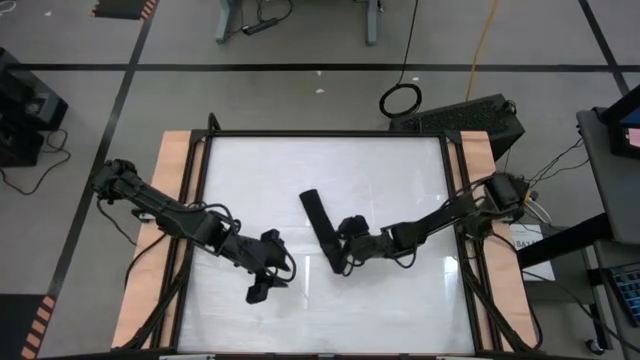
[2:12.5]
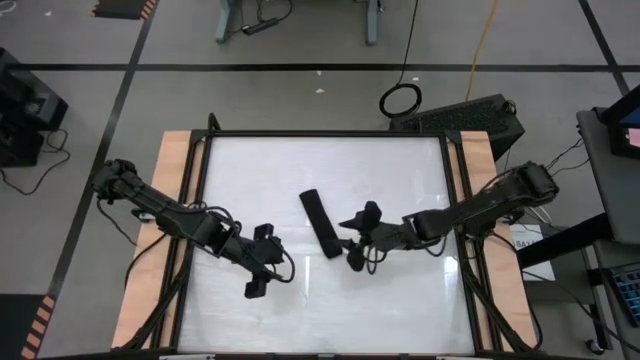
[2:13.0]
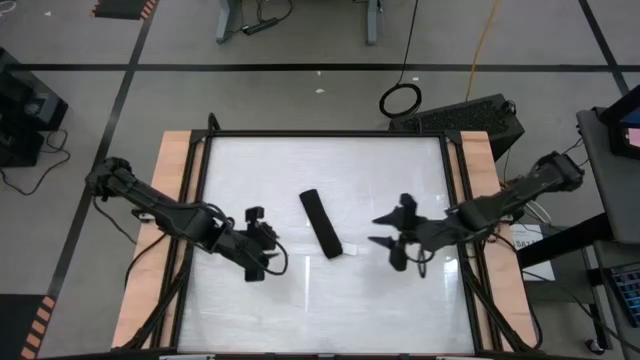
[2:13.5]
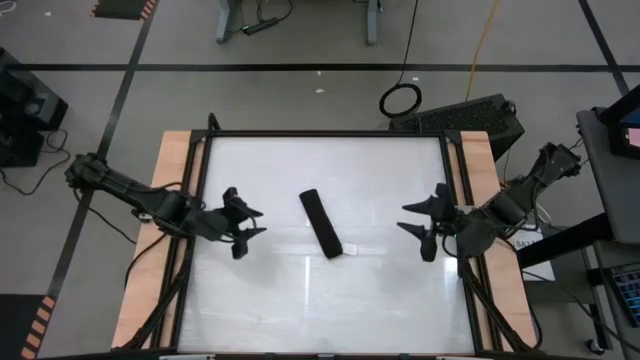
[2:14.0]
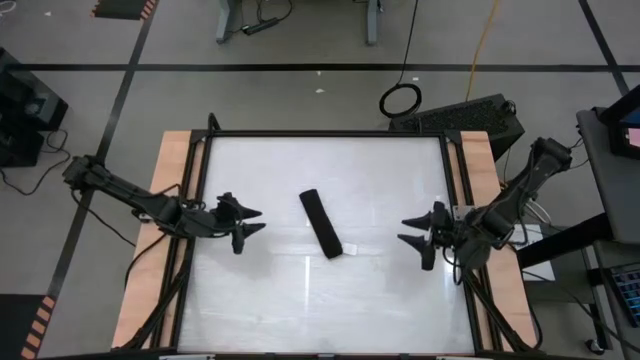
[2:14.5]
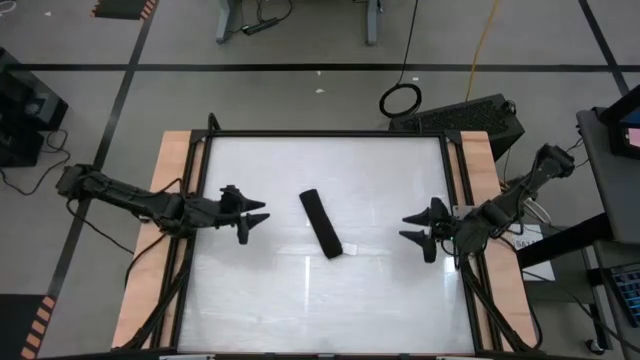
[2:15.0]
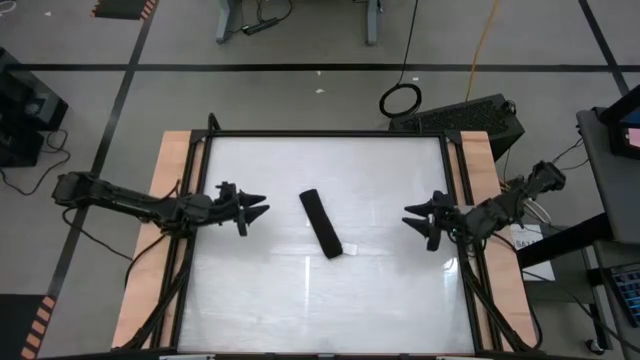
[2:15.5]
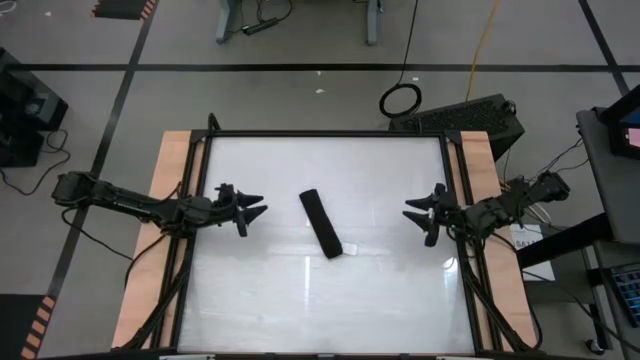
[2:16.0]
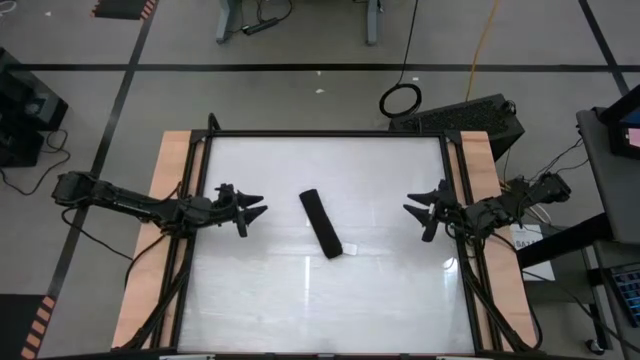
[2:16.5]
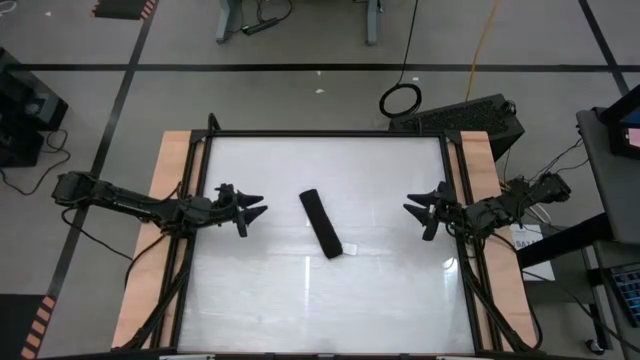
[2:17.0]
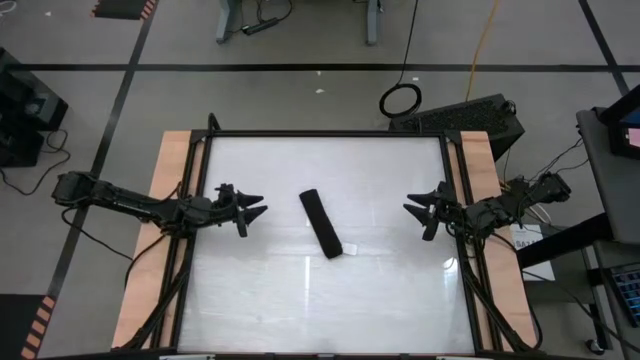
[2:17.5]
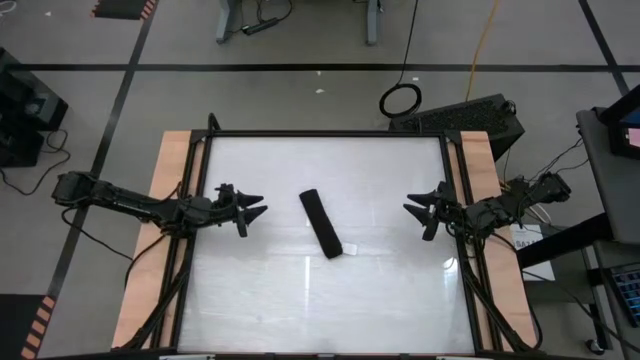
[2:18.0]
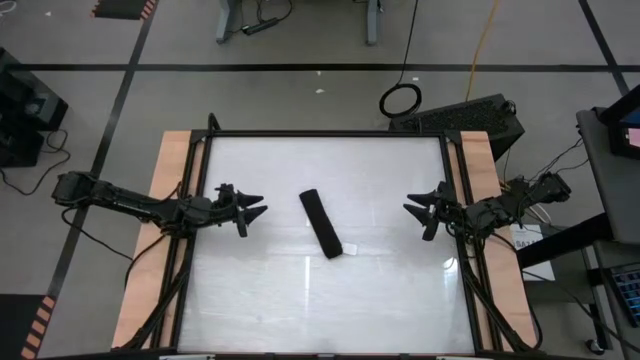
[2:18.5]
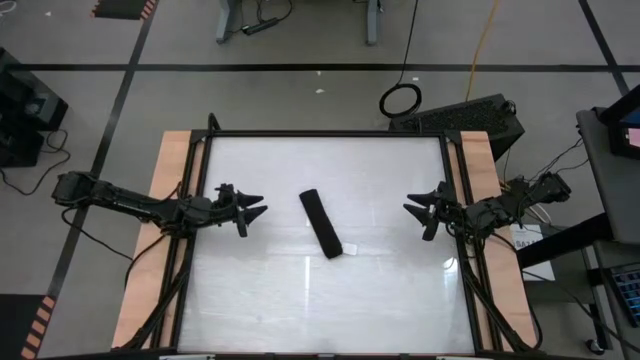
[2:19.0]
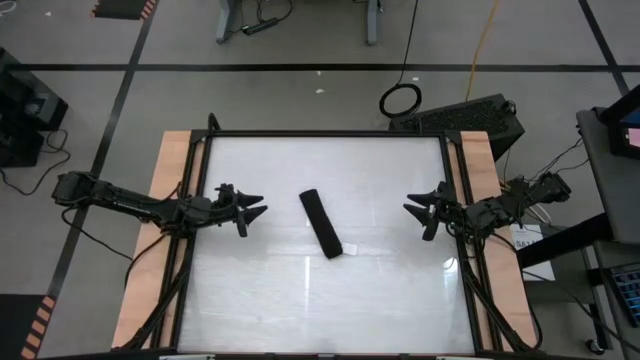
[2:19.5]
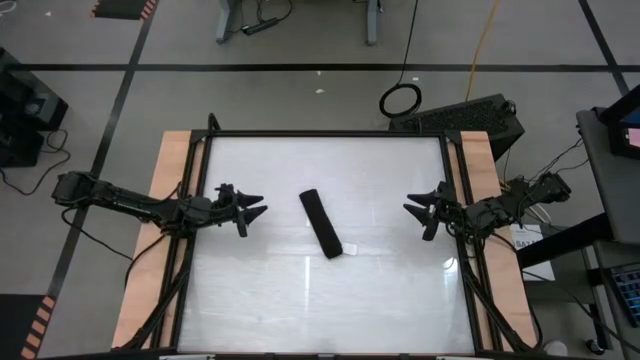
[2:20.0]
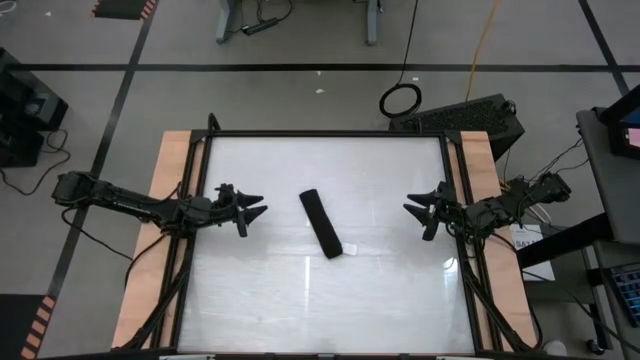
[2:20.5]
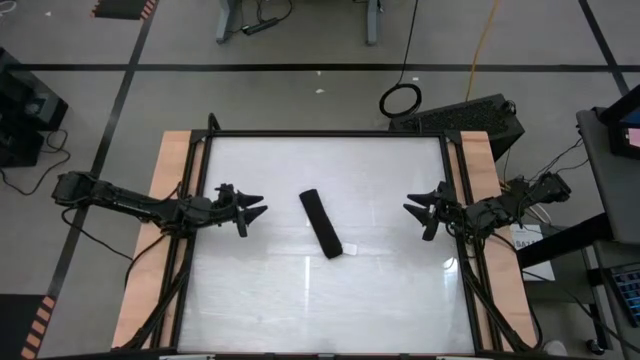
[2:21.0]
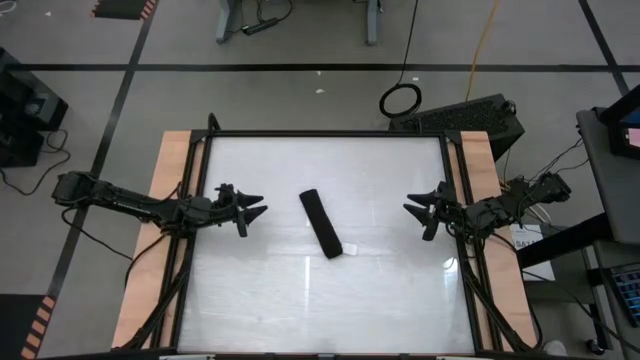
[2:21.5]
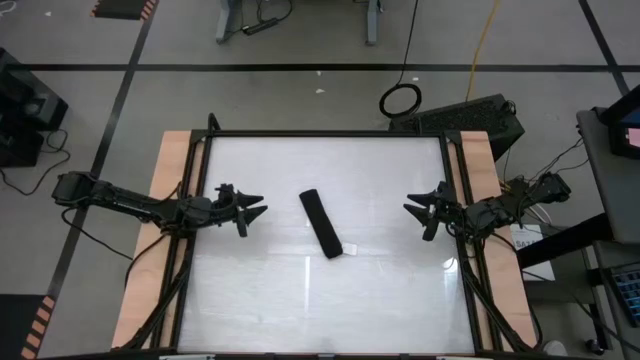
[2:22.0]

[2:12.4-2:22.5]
Task: Roll towel
Return to Home Position

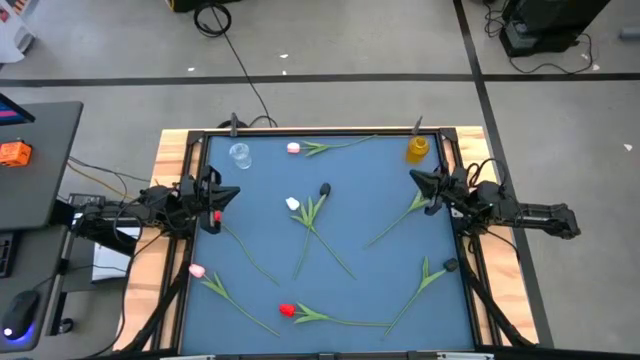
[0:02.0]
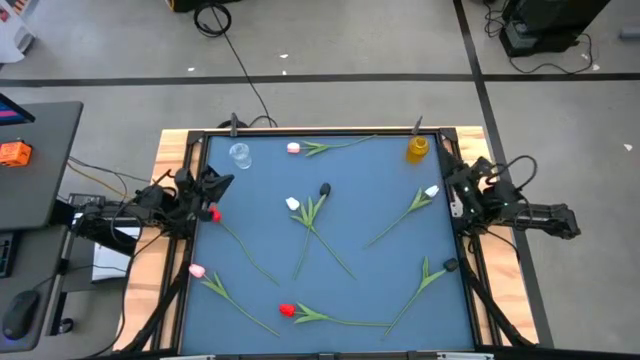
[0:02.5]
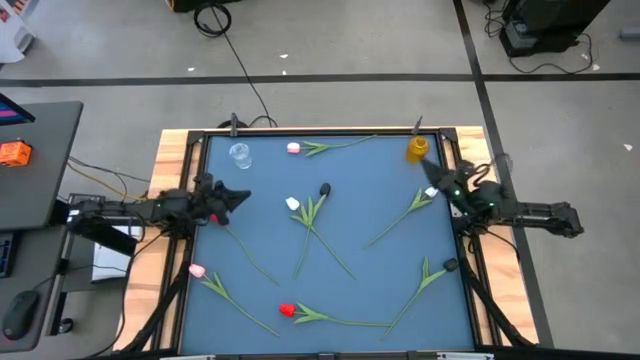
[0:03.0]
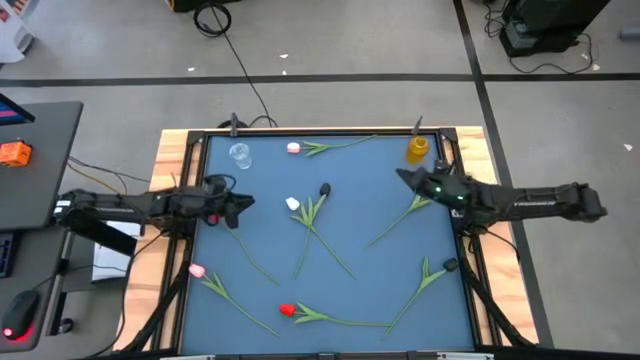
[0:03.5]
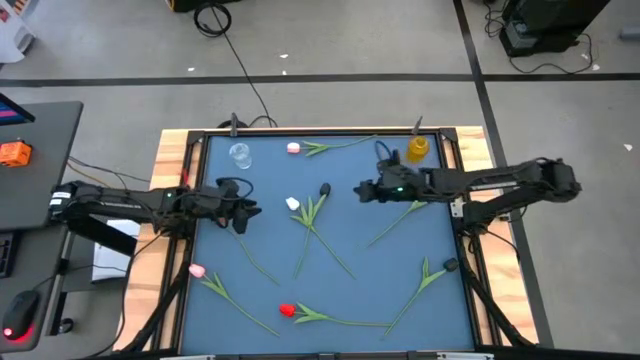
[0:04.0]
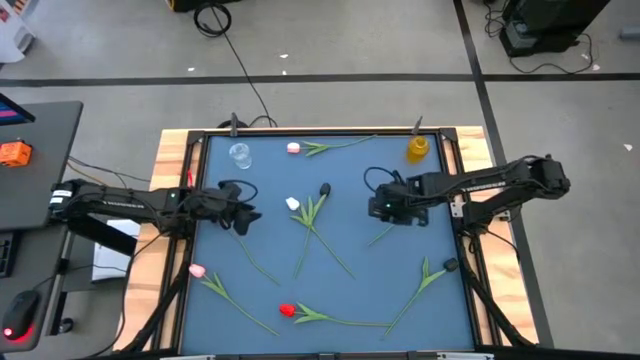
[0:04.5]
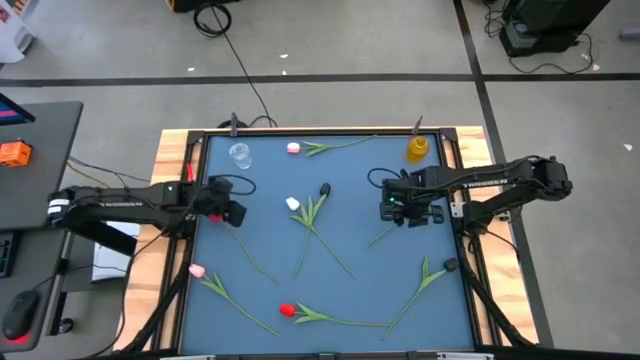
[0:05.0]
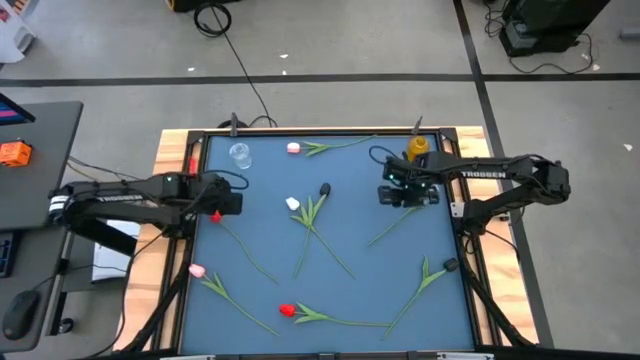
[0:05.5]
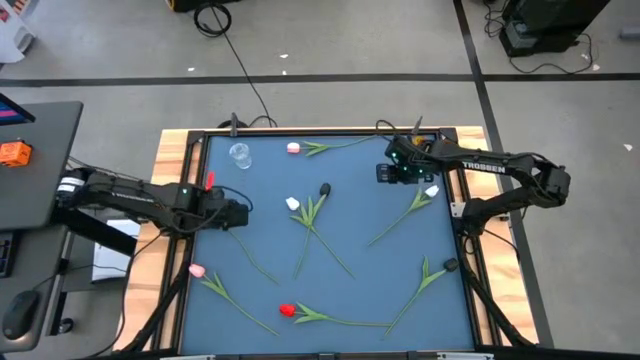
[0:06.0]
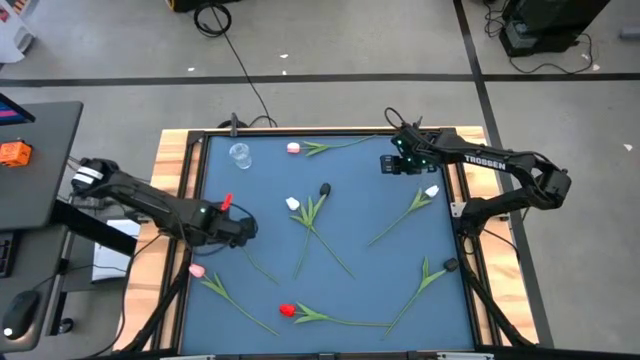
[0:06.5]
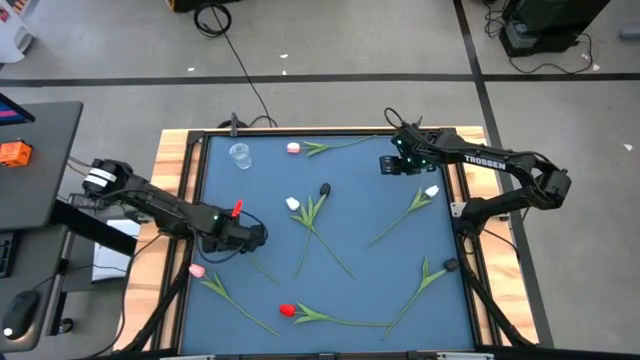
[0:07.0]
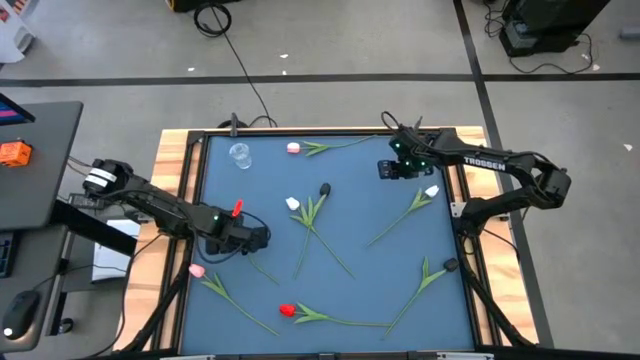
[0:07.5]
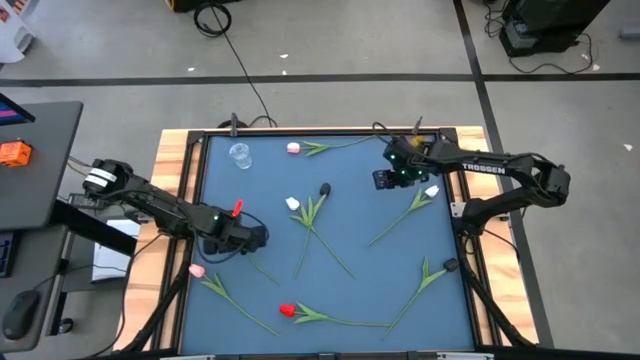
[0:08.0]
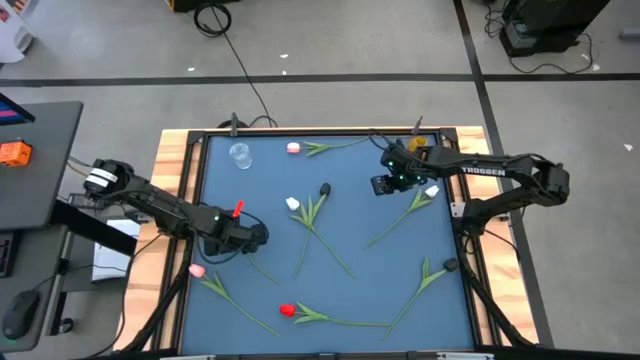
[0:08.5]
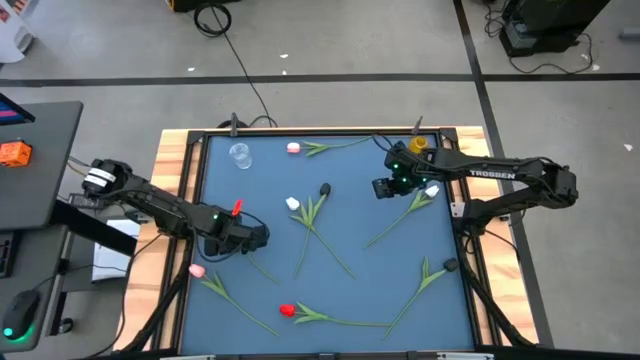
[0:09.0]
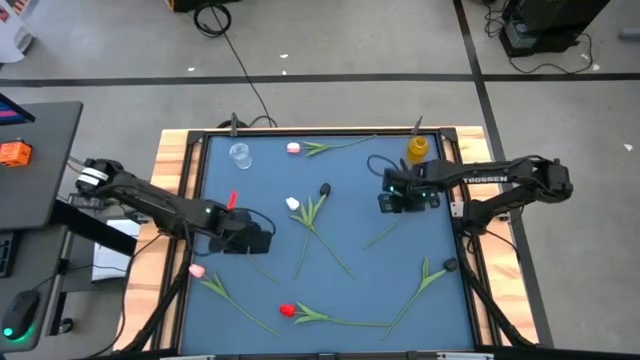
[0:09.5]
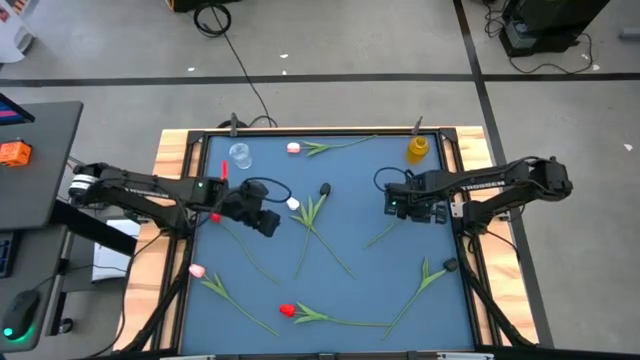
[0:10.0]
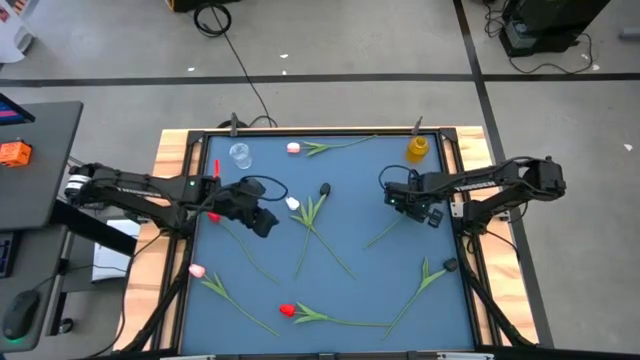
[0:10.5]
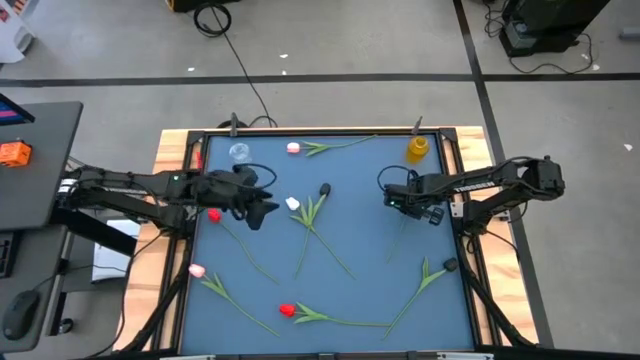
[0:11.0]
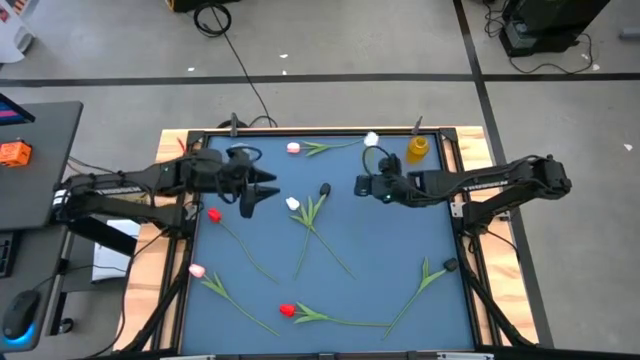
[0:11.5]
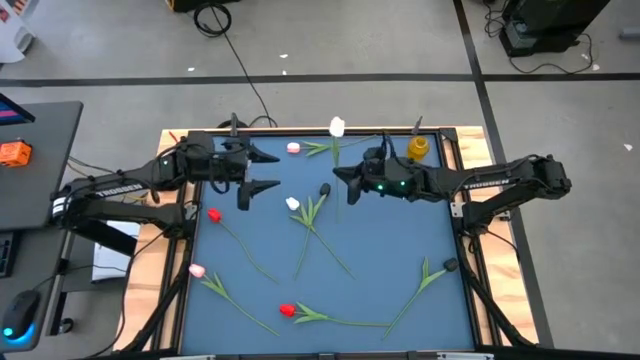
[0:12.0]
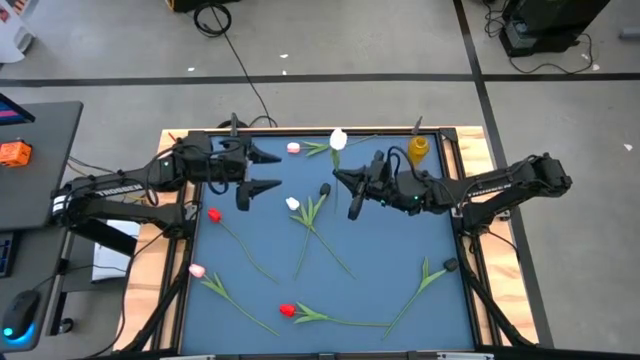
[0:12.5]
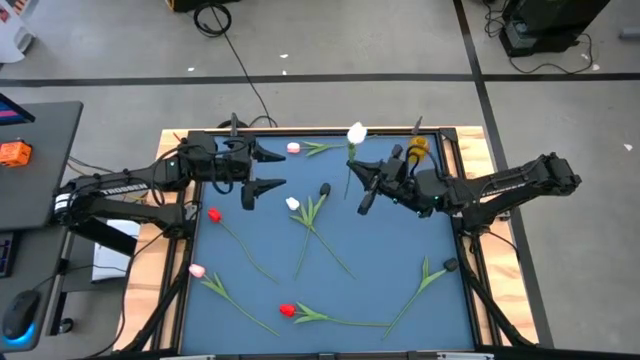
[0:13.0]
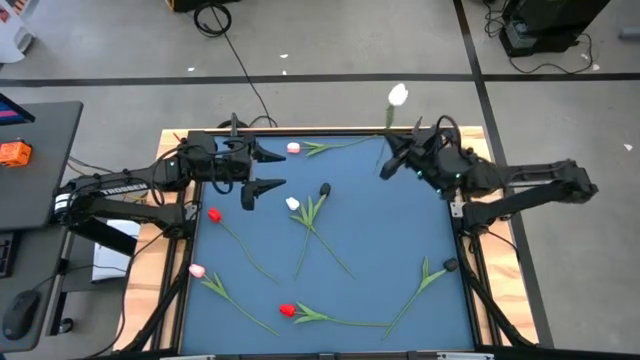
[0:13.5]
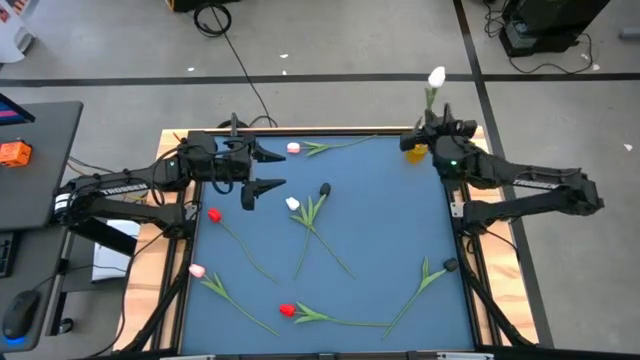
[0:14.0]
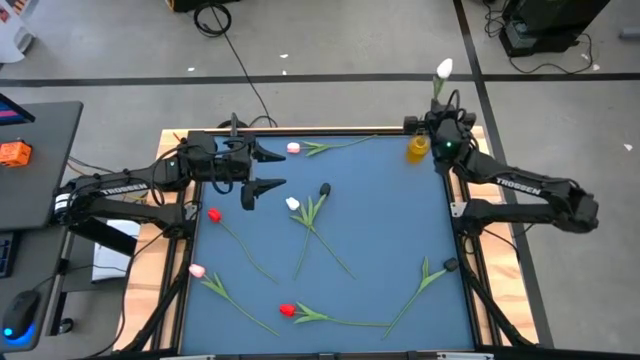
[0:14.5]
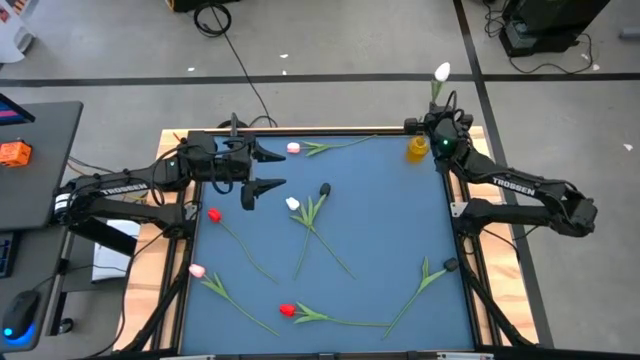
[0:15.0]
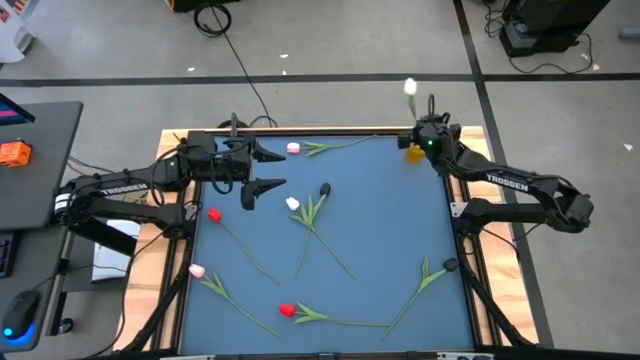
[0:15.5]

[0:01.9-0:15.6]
Task: Sort flowers into vase by color
Put the right white tulip into the yellow vase
